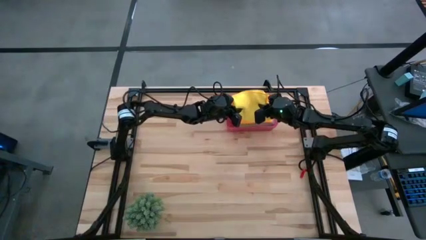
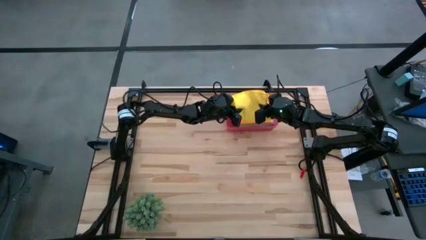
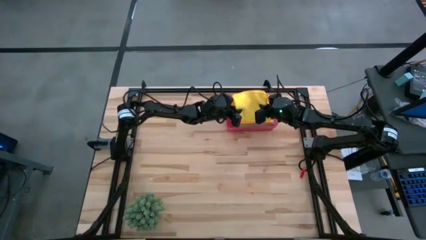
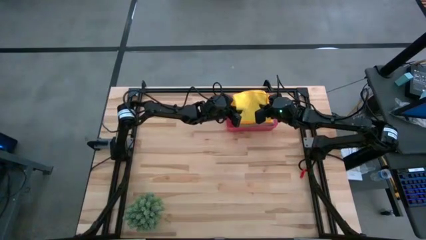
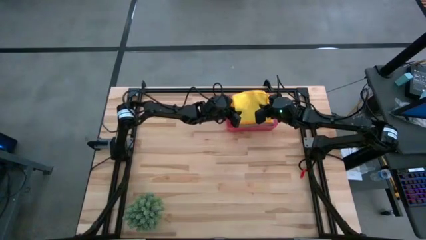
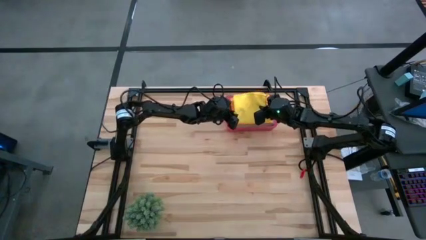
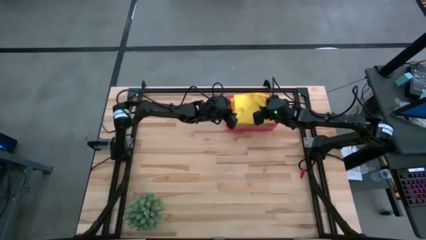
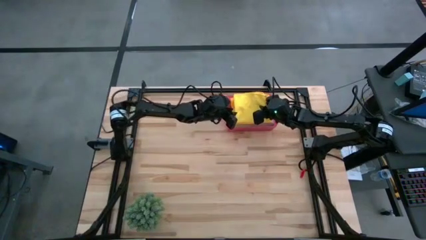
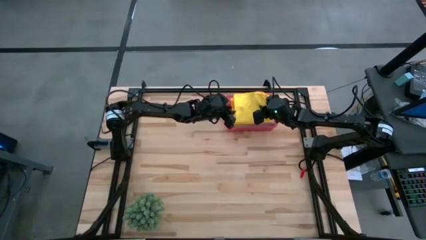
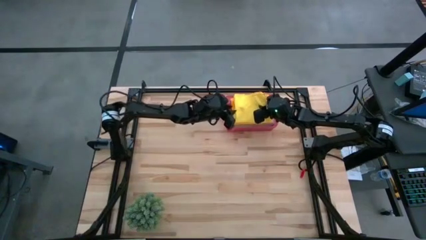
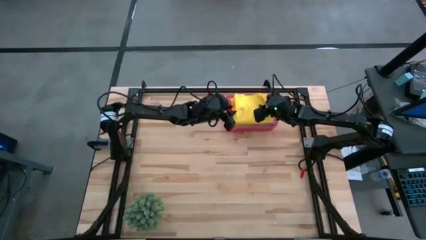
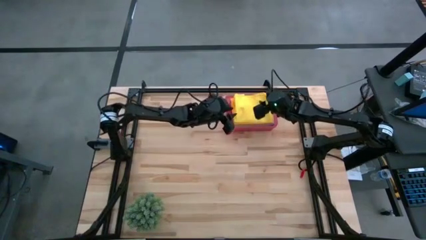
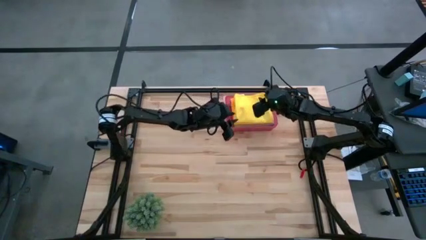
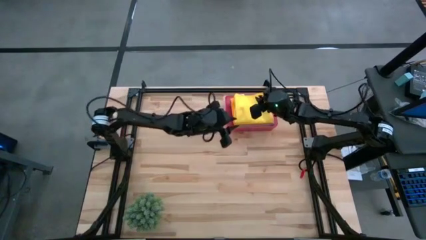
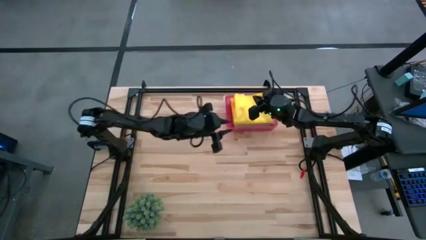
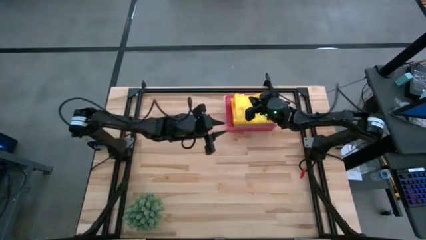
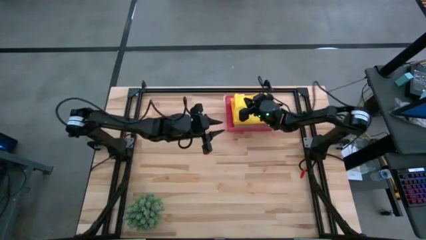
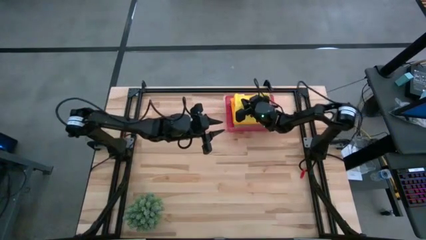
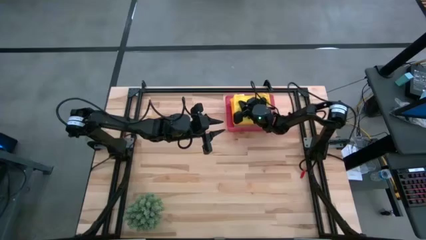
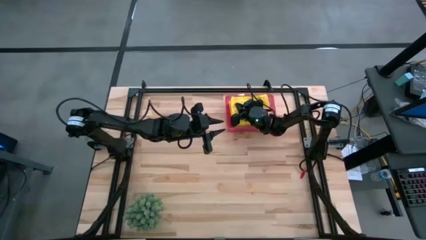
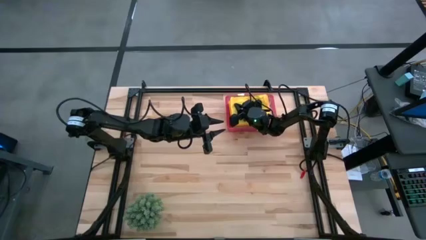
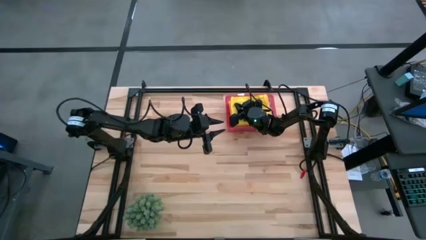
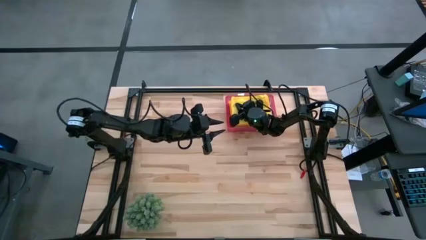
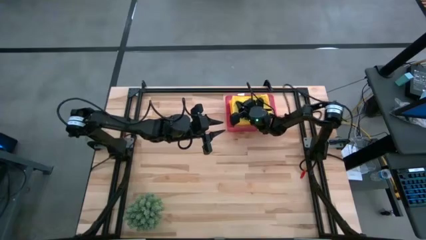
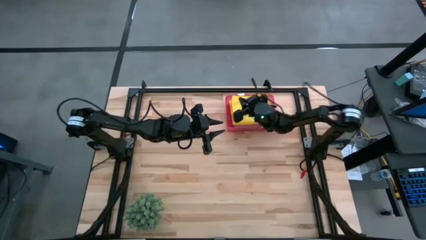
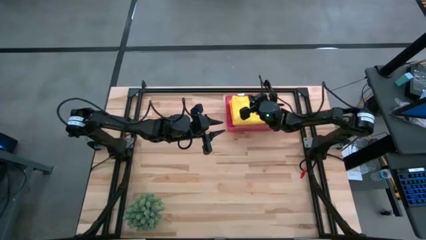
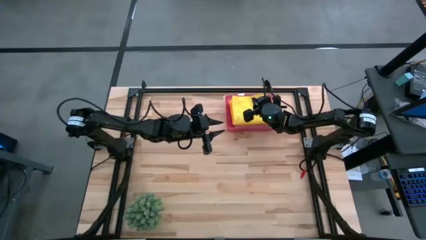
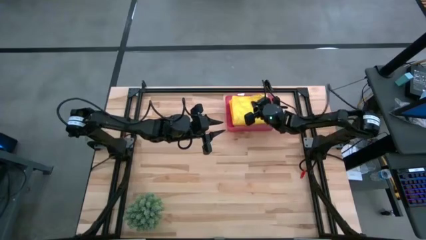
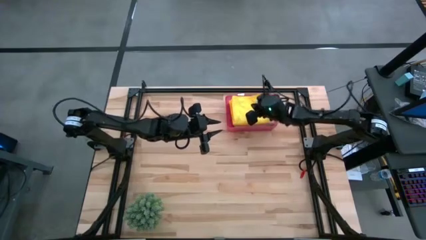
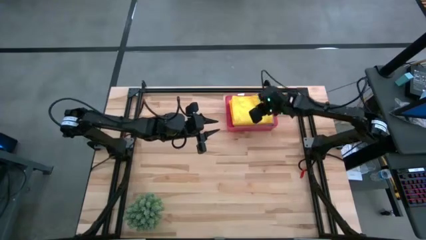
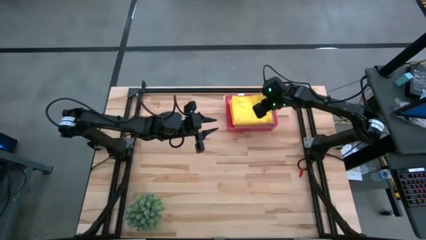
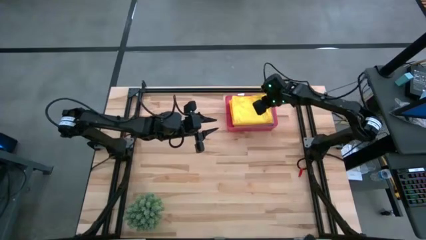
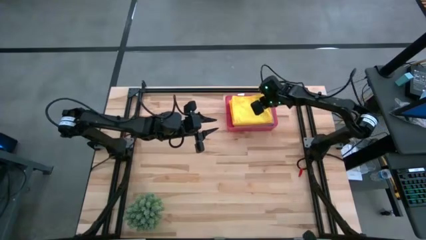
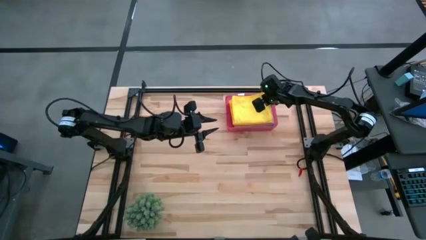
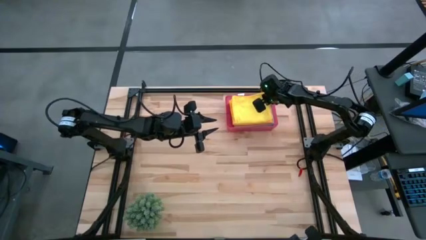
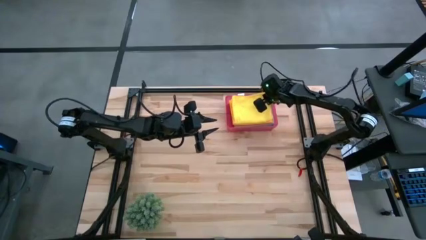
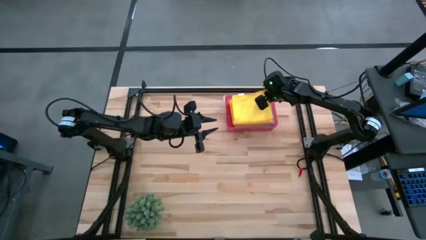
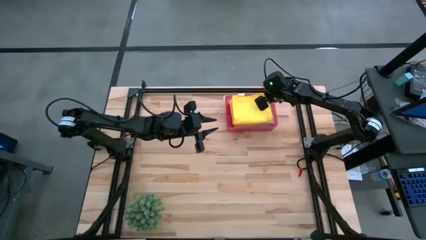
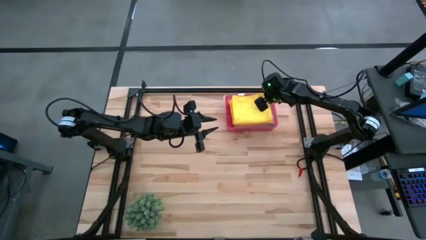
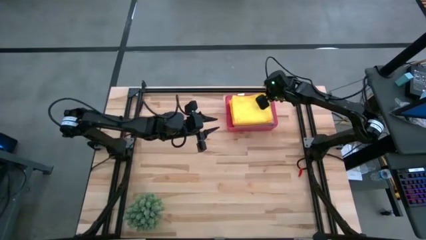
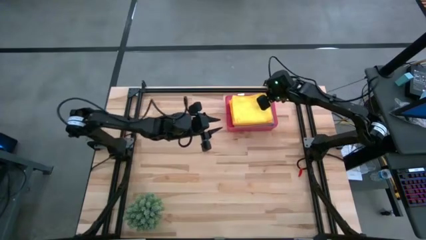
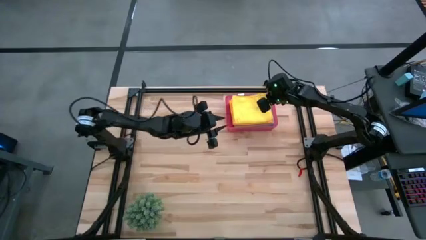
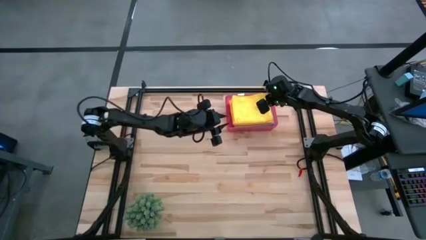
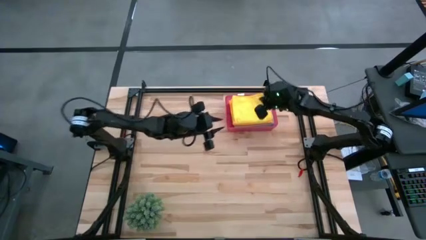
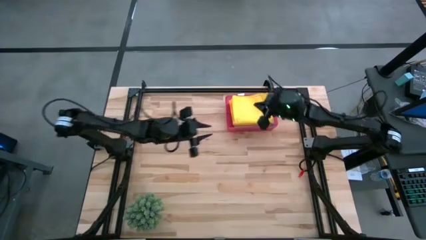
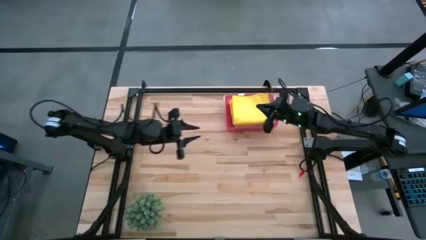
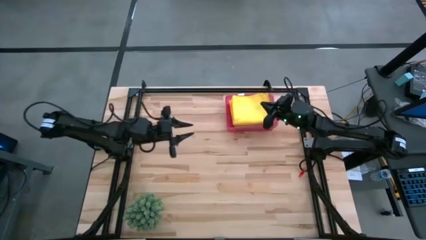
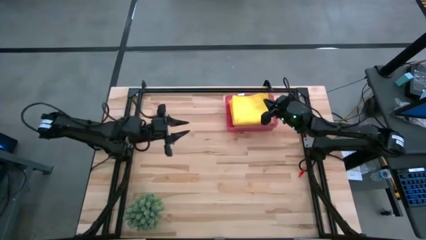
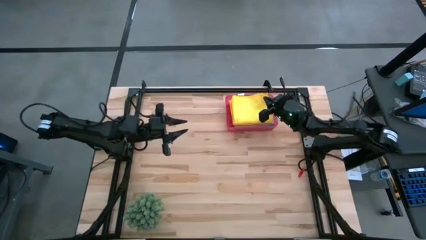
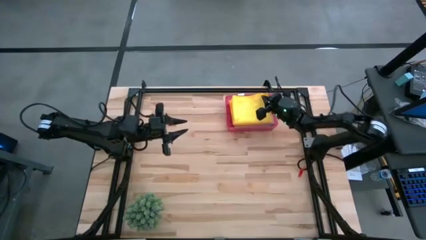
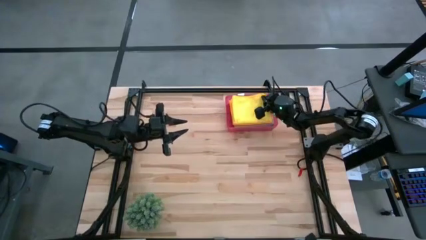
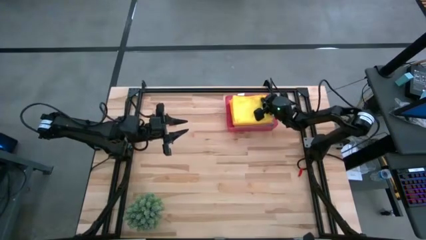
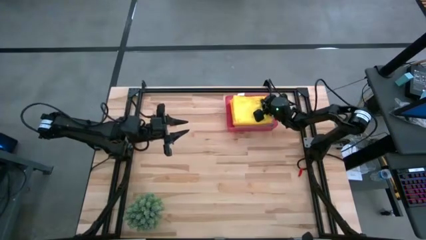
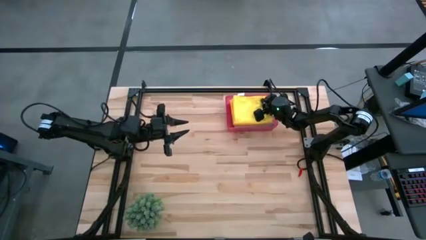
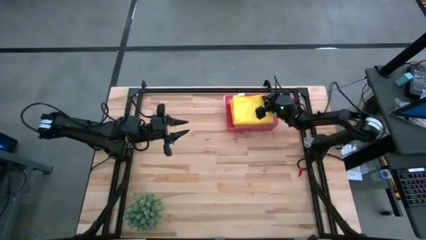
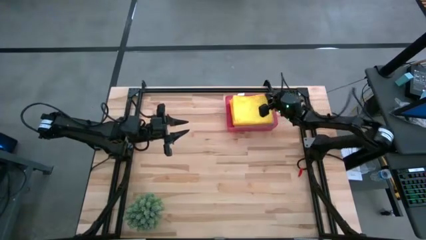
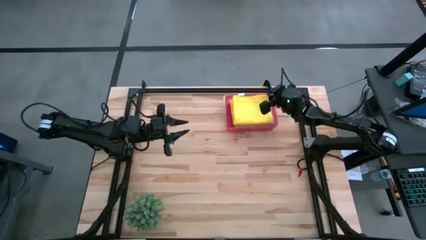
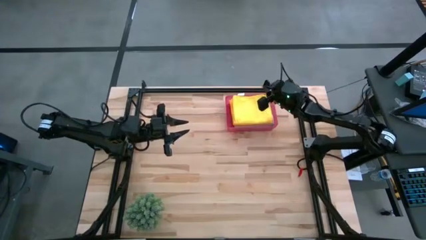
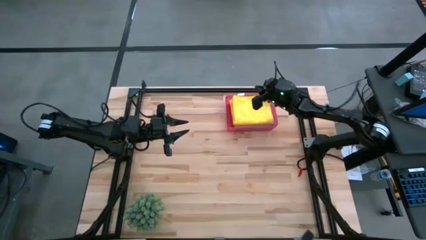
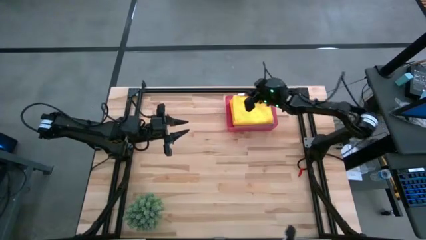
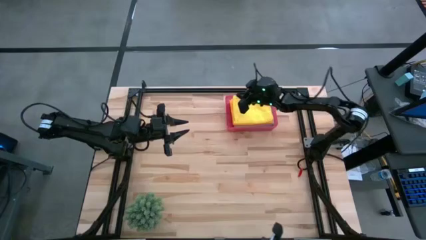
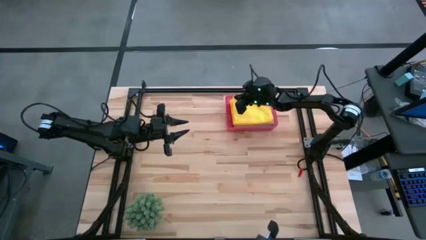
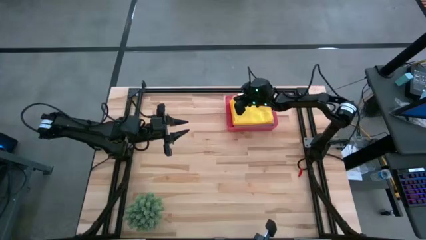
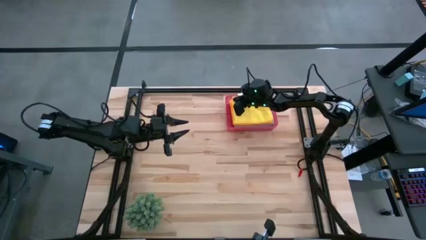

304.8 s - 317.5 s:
Task: Fold microfiber towels
Put the folded yellow microfiber cloth into the red bin

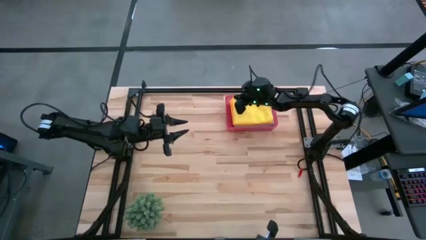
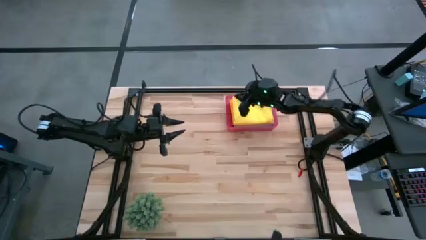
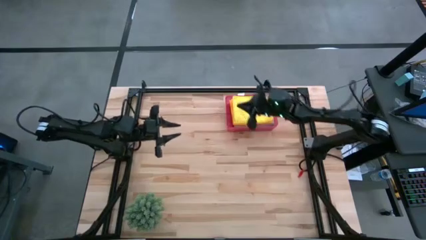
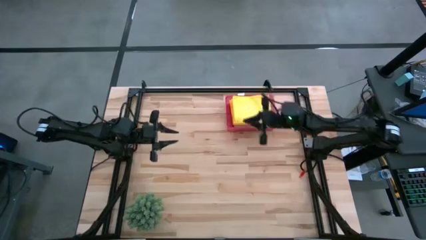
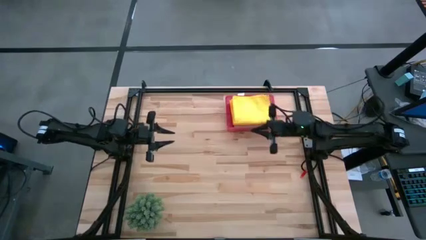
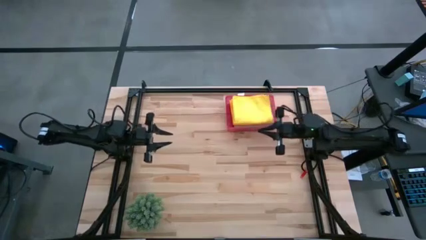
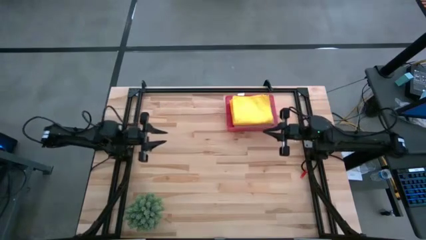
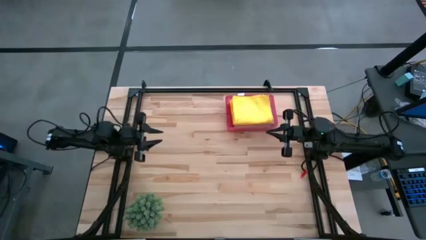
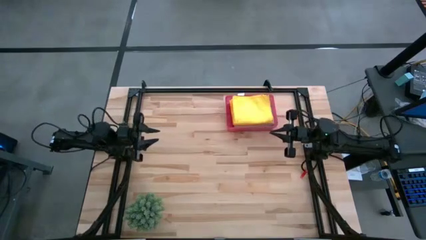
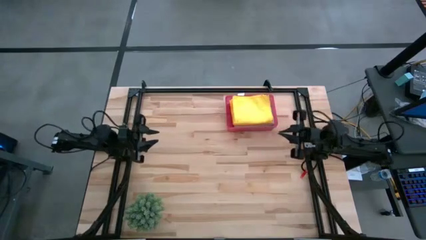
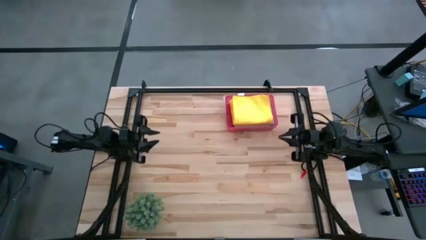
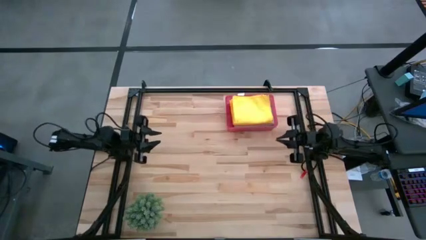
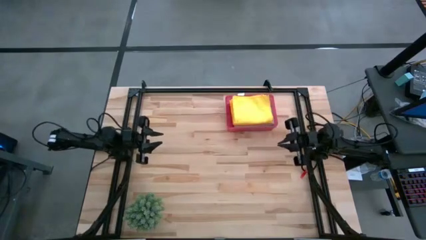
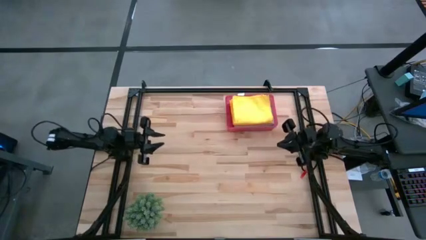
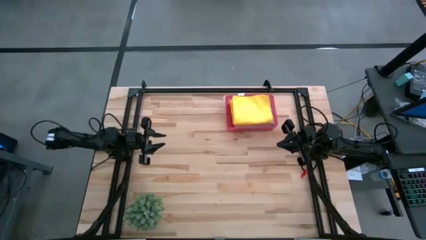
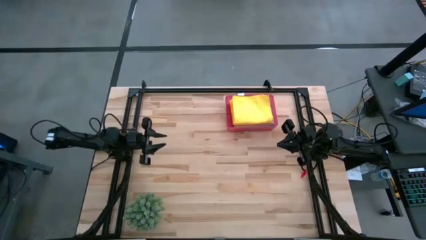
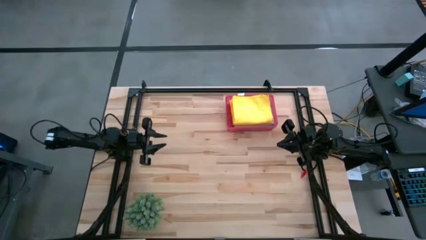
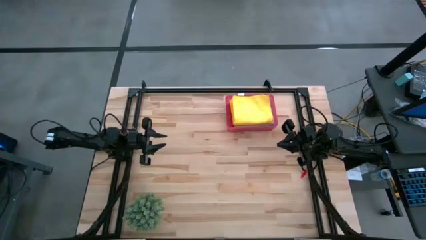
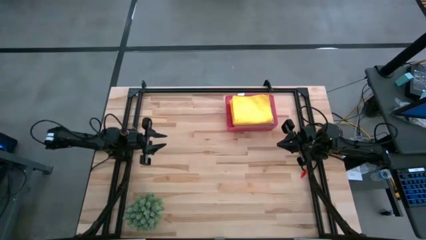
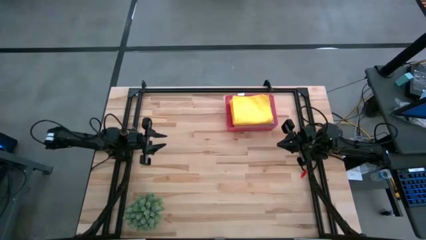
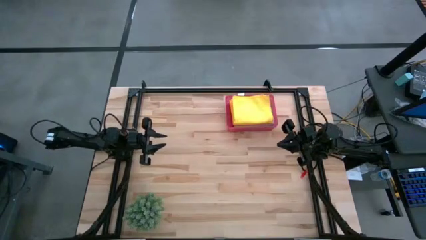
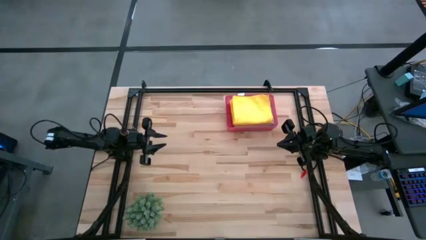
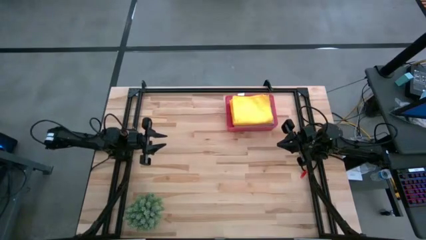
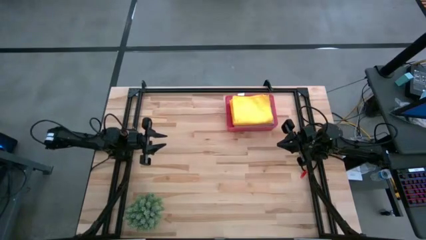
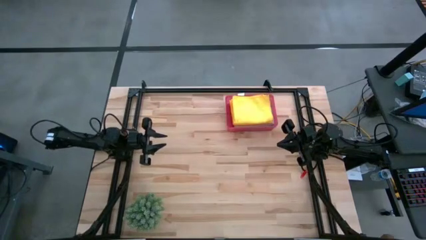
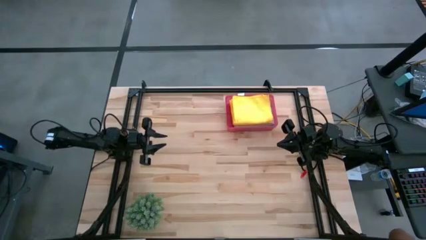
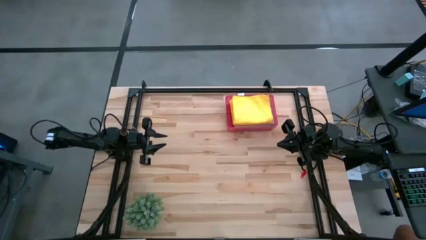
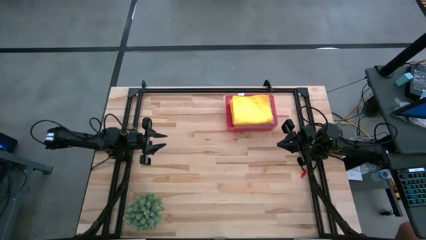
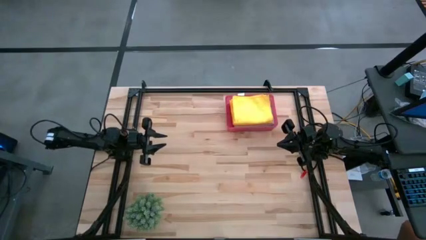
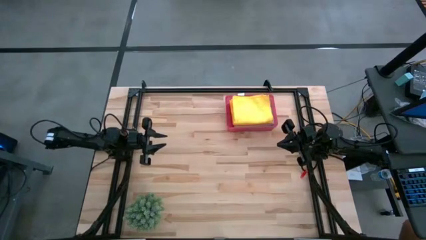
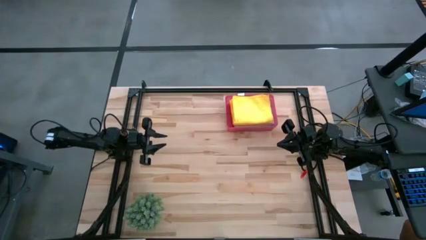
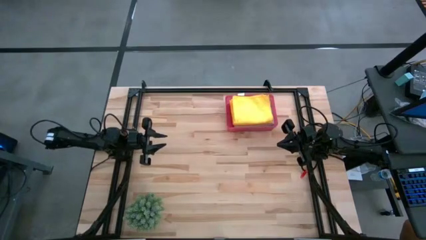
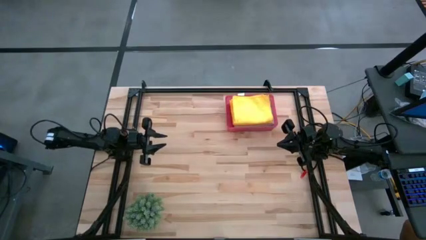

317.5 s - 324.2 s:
Return to Home Position
